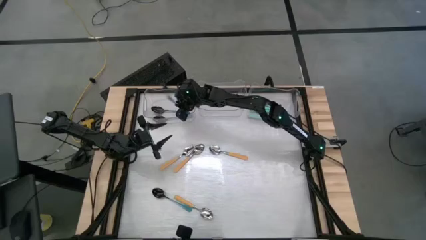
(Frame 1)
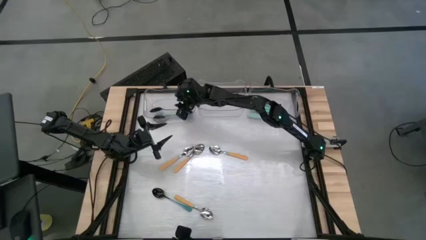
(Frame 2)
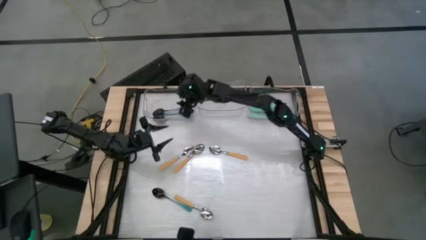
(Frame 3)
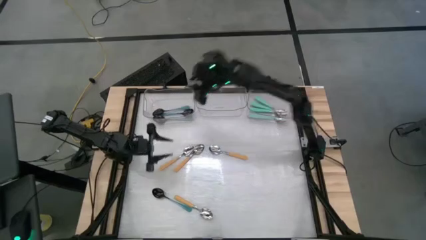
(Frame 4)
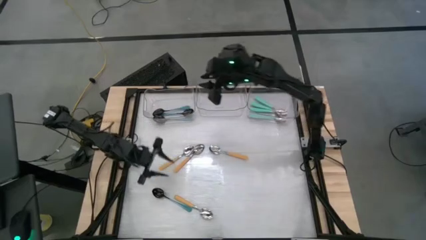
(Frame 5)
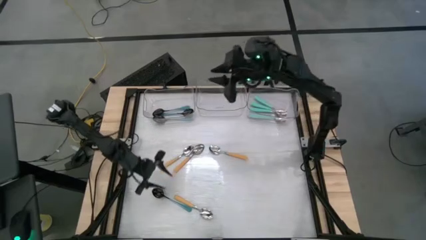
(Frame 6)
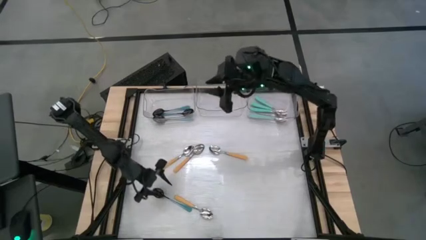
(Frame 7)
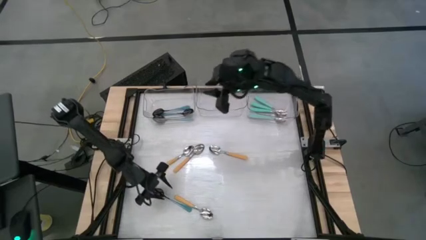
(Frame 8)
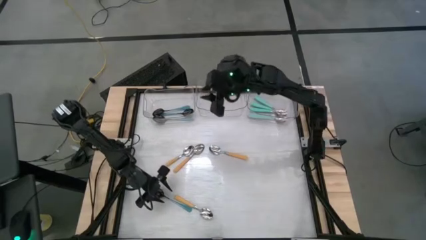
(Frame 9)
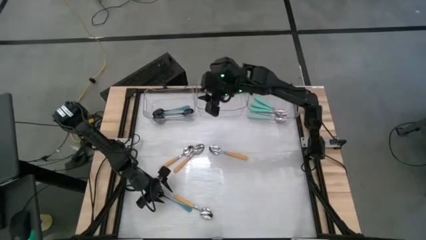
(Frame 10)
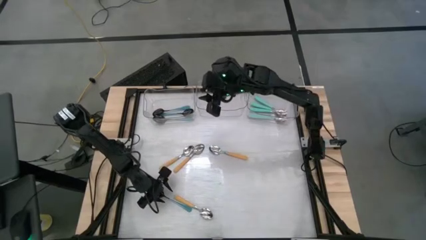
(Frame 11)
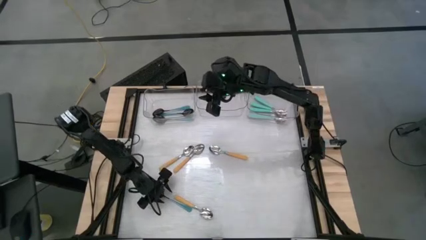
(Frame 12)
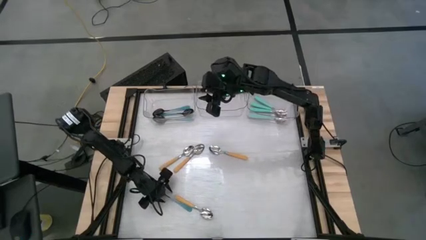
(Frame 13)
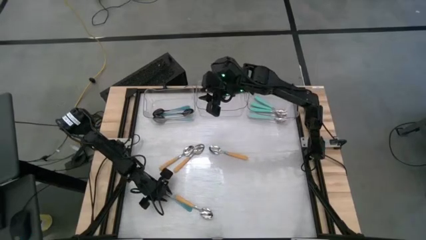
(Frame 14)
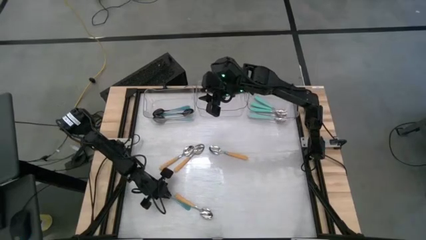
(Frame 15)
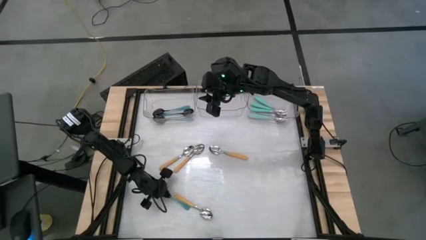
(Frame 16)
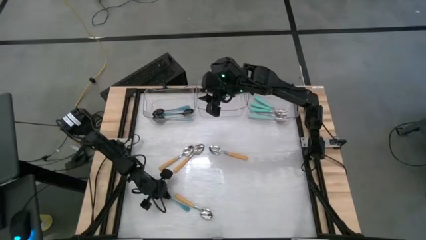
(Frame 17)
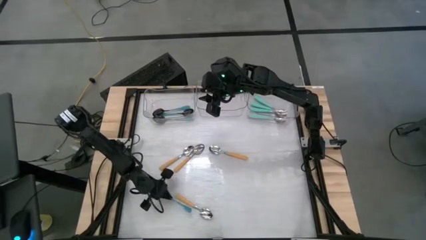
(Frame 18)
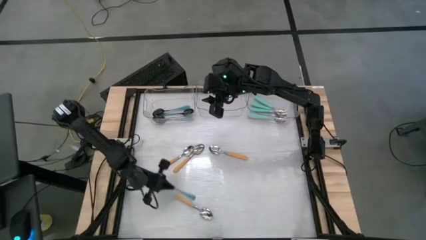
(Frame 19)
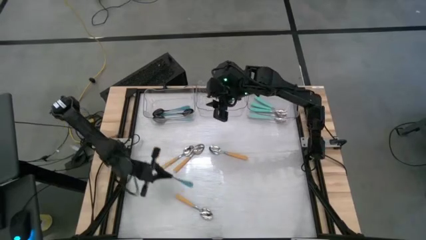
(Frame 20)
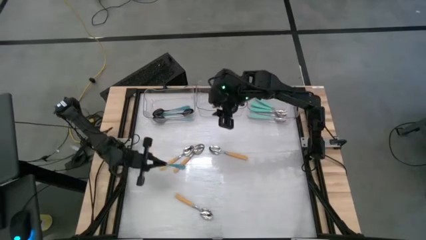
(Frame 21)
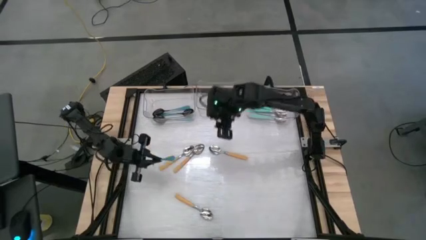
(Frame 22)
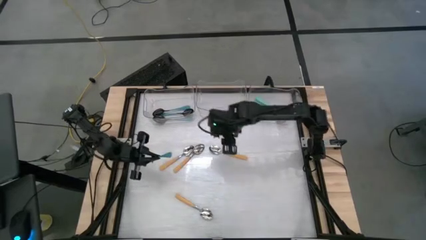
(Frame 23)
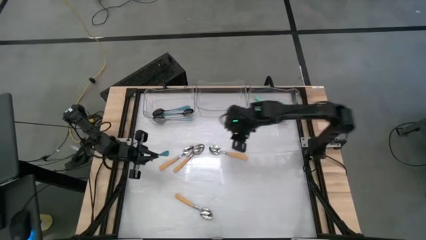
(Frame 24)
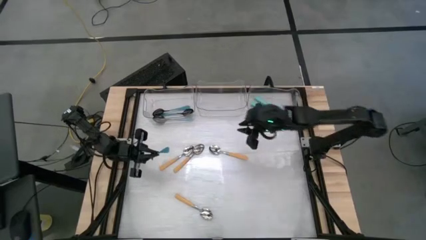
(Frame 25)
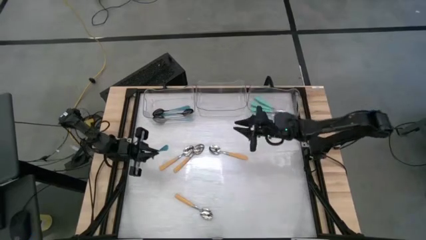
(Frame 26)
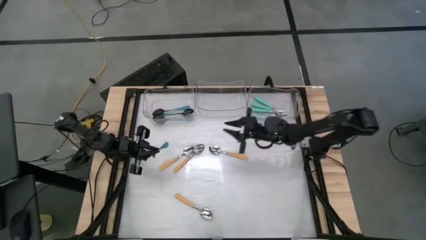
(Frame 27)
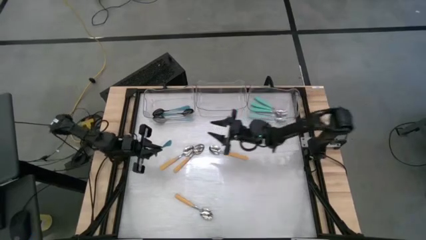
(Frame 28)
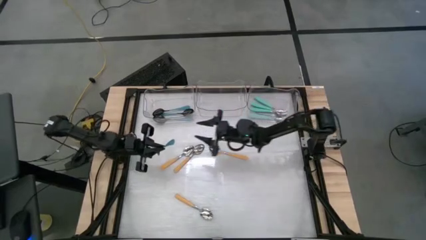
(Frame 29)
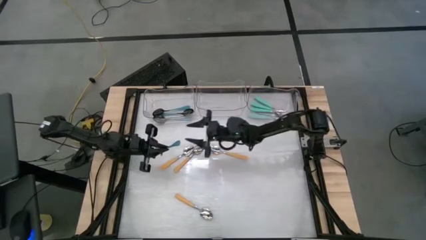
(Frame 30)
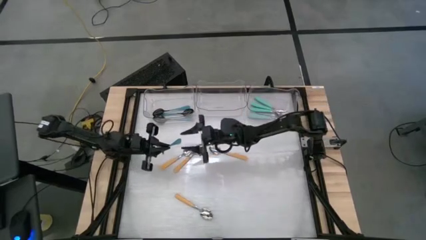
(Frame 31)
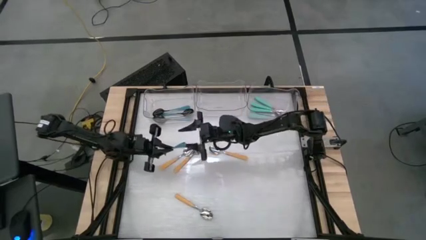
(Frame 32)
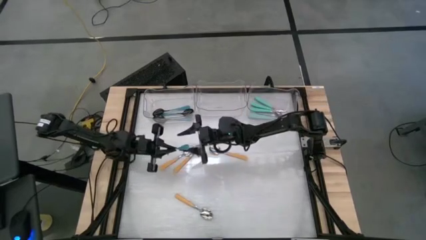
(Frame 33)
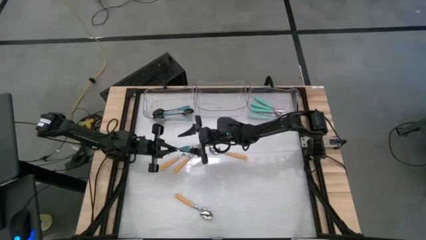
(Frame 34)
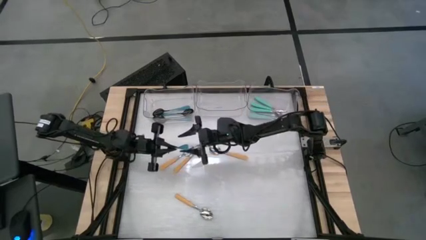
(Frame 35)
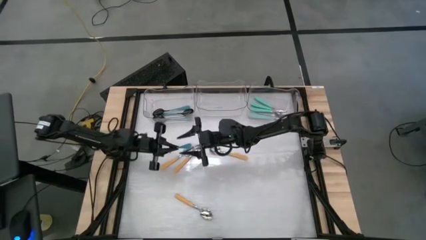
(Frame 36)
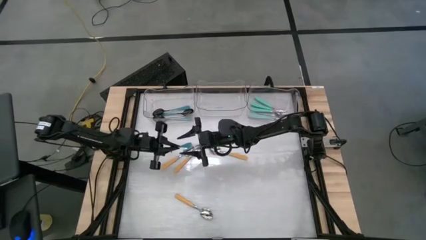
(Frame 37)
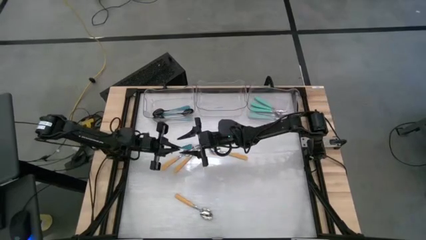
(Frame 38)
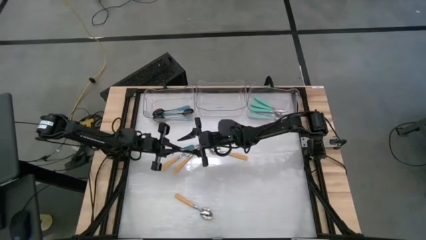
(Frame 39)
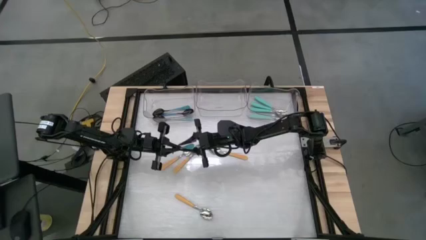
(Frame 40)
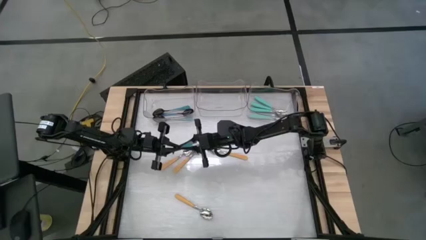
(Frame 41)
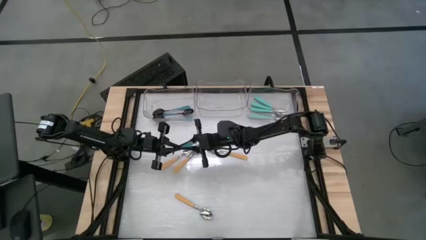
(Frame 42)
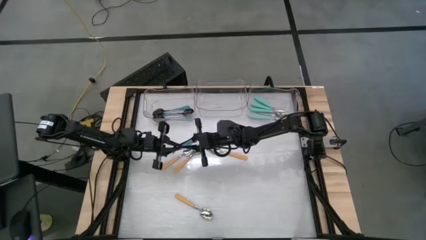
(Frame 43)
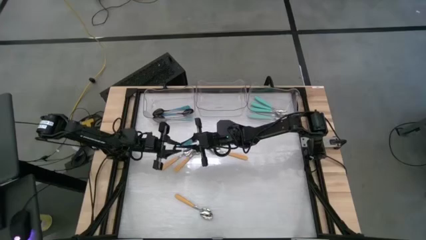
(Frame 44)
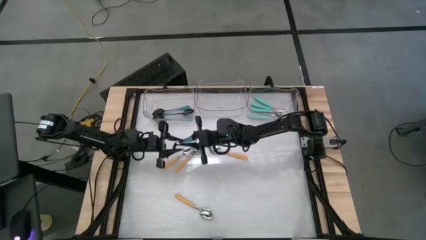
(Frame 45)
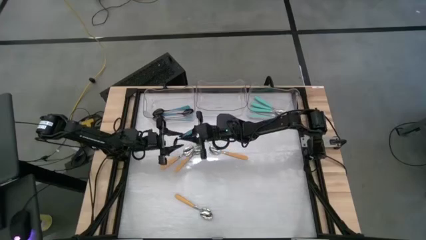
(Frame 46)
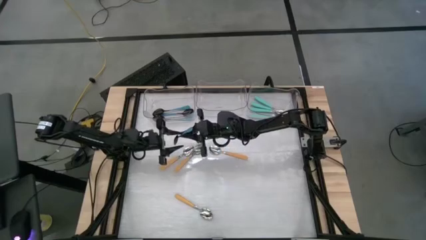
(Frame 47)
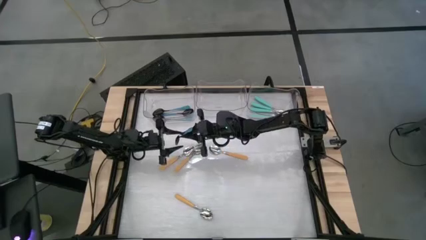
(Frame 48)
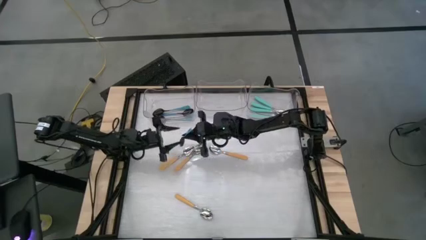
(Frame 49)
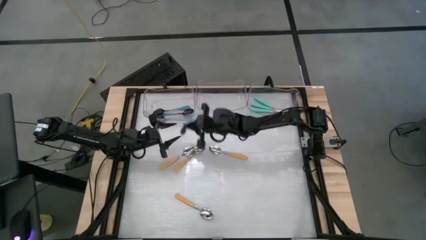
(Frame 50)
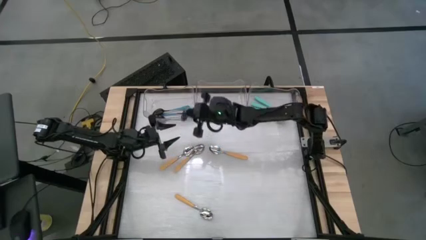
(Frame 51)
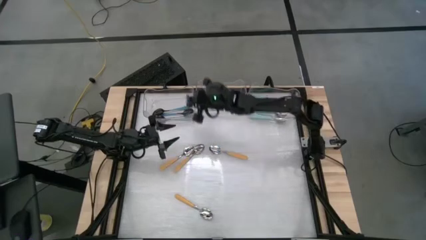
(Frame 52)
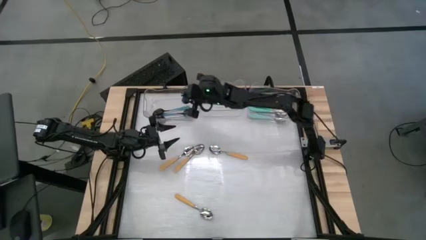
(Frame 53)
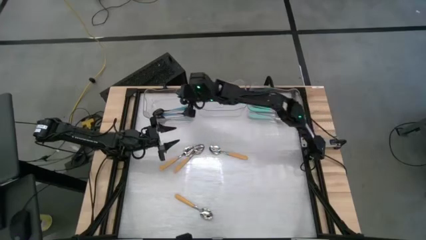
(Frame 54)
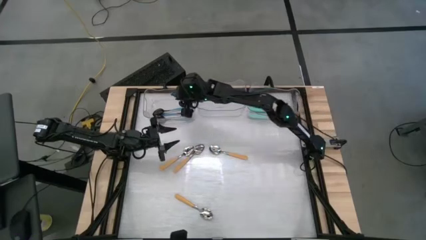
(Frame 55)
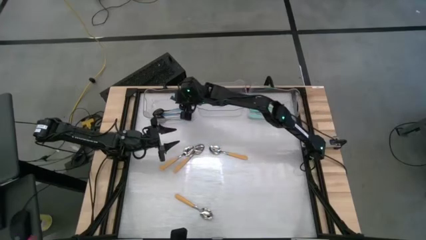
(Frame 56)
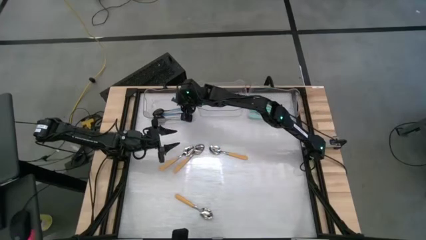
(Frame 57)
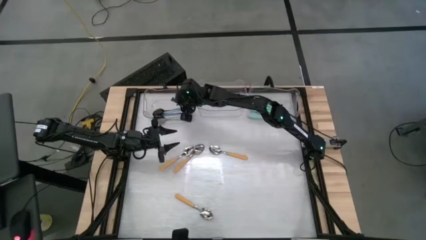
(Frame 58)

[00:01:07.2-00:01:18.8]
Task: Sort silverware by color (type)
Put the blue spoon into the top left transparent bin

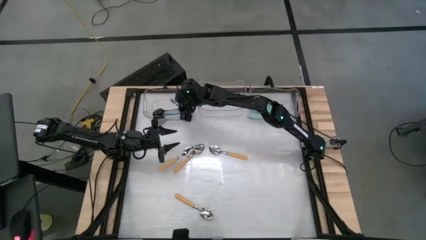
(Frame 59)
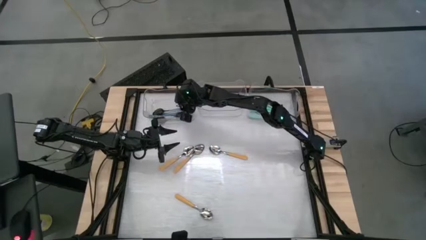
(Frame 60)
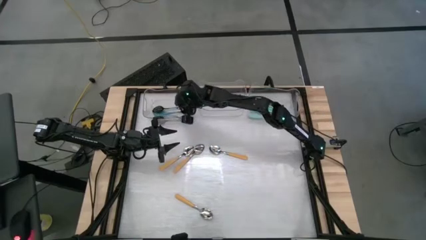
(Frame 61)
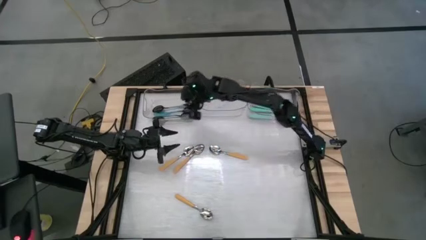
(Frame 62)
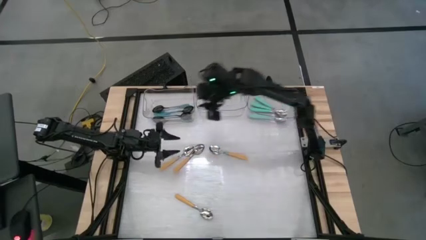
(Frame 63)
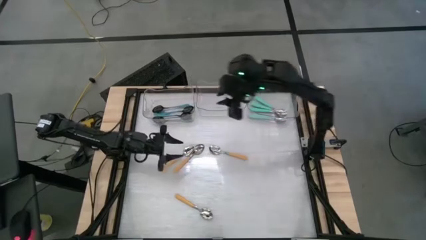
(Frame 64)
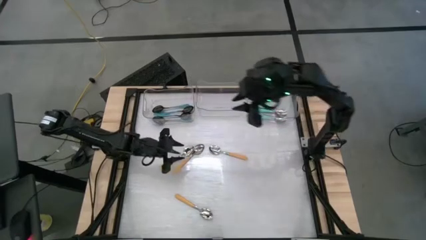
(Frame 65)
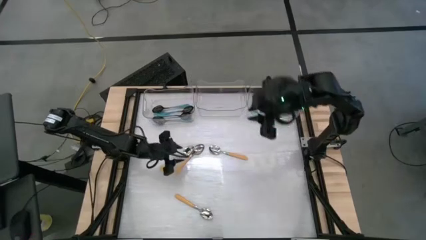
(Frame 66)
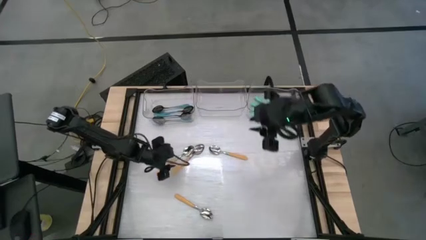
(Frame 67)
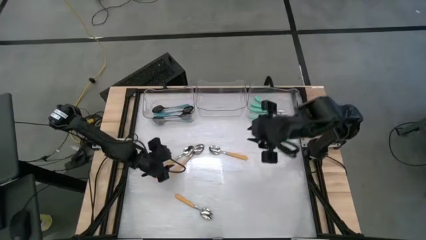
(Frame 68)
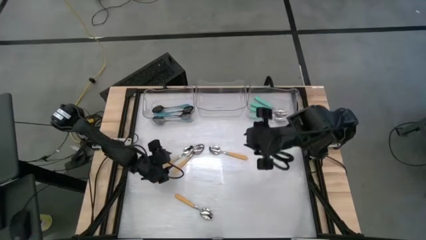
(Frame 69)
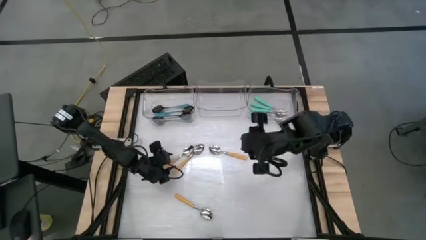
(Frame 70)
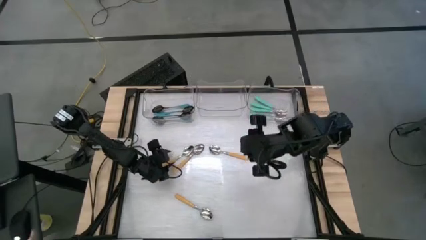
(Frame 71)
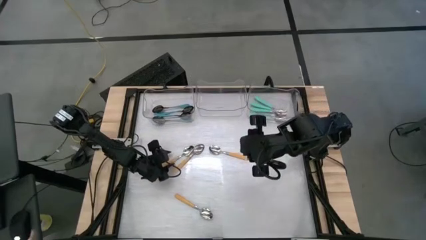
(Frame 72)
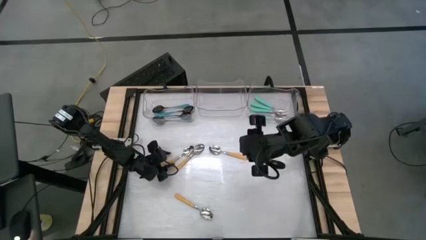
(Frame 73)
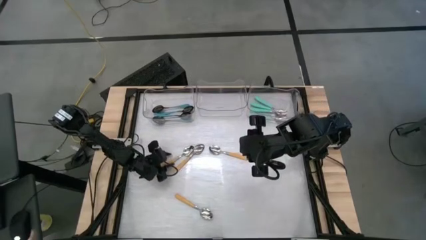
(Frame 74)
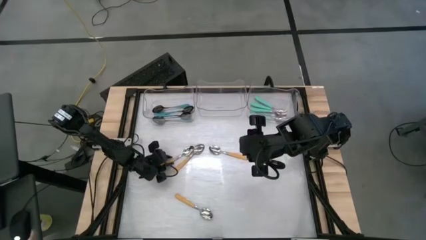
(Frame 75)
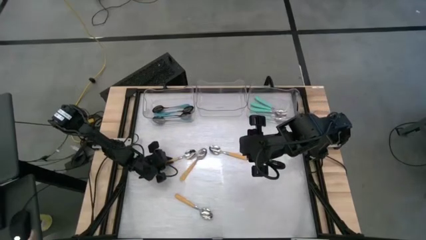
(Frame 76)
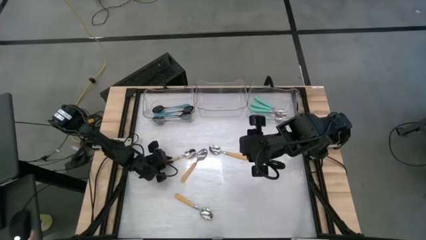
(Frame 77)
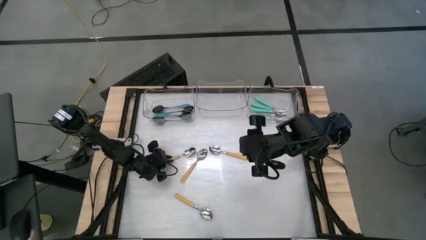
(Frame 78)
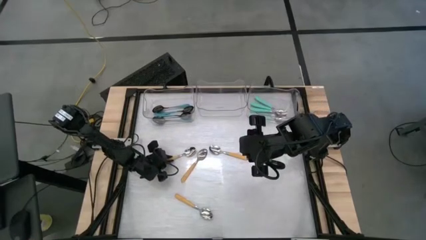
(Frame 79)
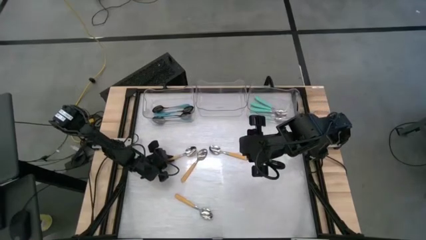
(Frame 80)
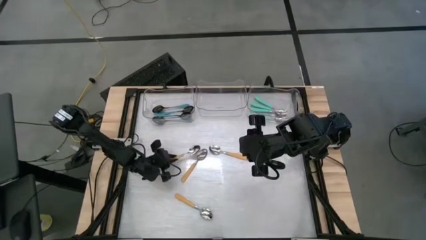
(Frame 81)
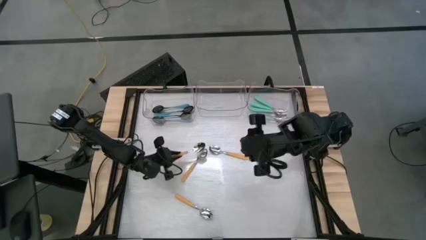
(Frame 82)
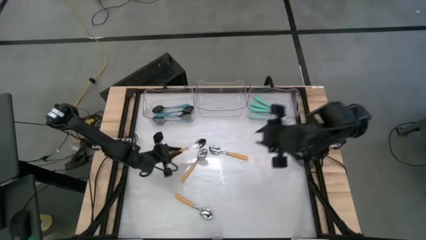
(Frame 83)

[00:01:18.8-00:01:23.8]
Put the middle left yellow spoon into the top center transparent bin
